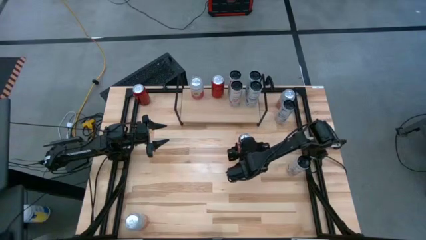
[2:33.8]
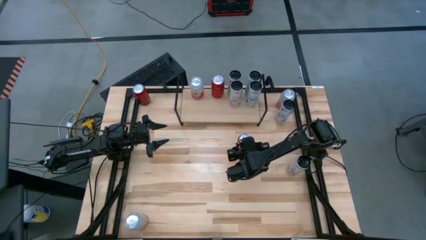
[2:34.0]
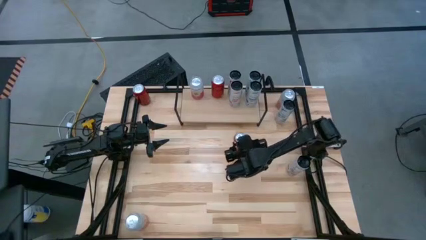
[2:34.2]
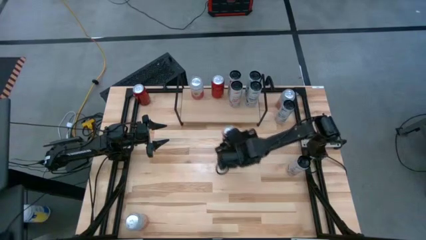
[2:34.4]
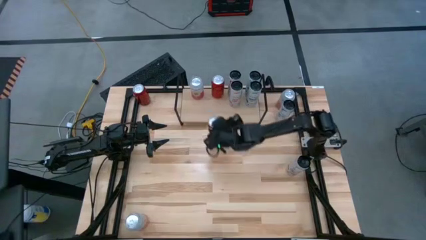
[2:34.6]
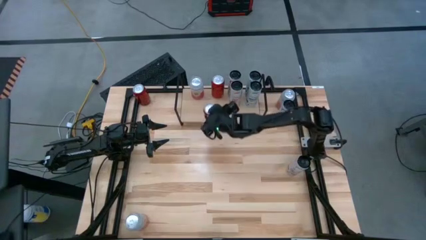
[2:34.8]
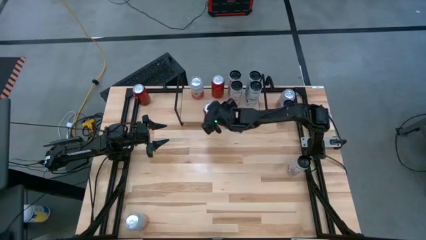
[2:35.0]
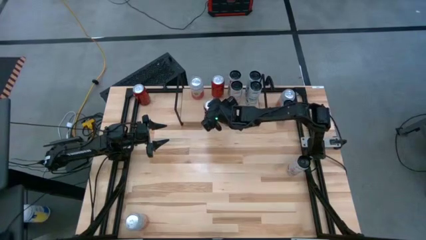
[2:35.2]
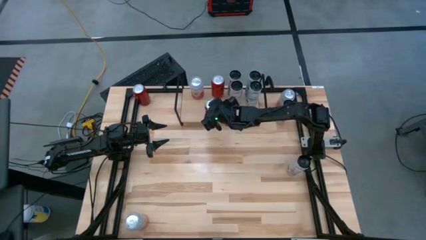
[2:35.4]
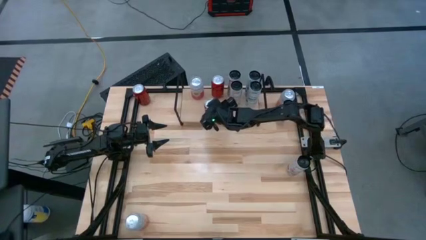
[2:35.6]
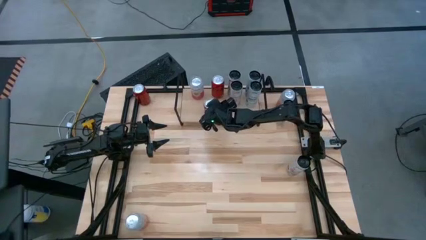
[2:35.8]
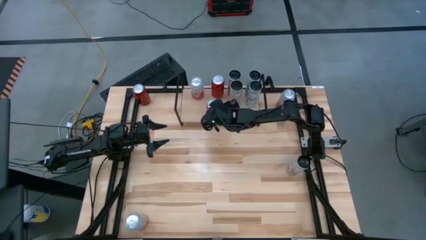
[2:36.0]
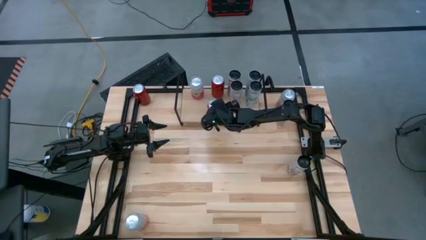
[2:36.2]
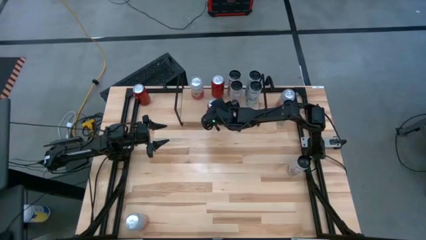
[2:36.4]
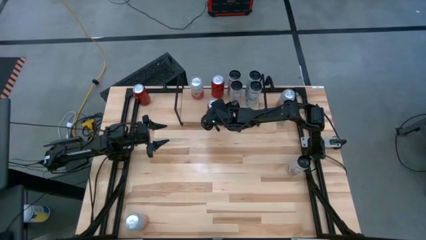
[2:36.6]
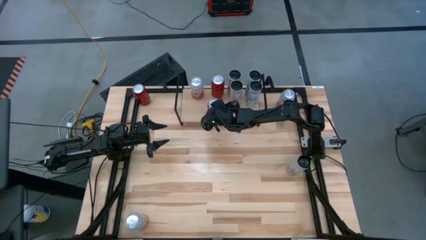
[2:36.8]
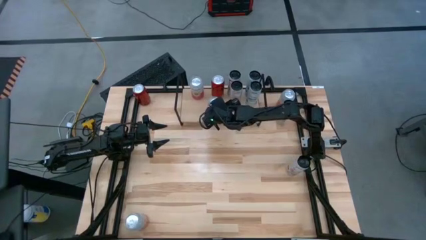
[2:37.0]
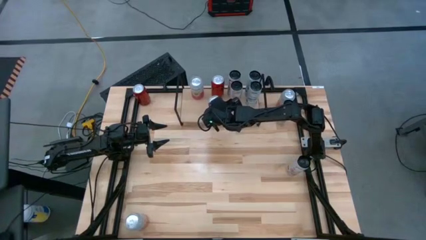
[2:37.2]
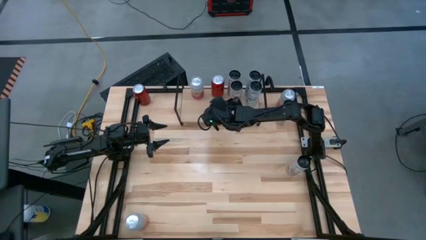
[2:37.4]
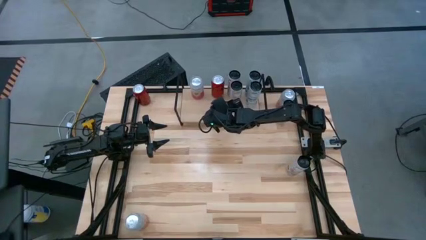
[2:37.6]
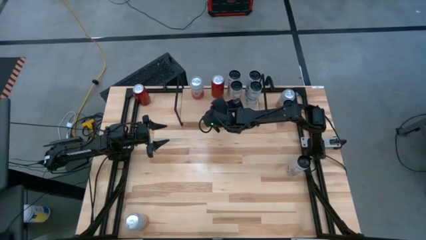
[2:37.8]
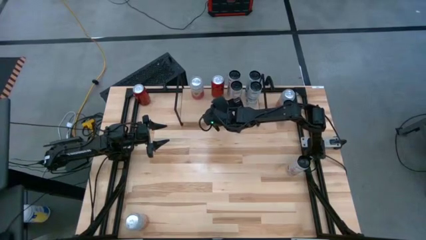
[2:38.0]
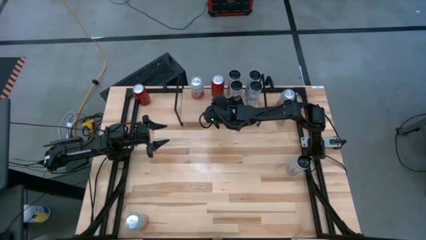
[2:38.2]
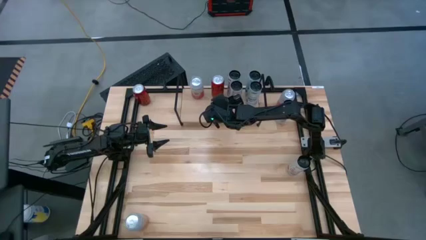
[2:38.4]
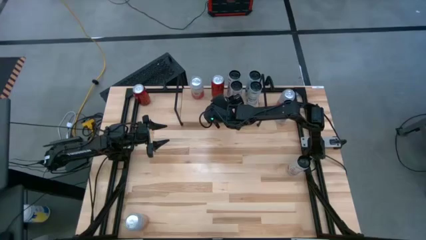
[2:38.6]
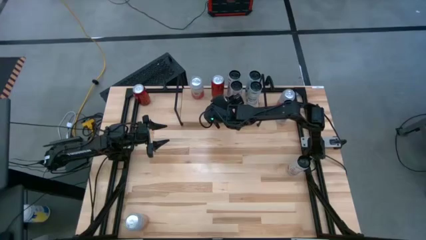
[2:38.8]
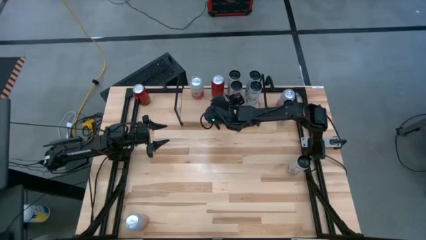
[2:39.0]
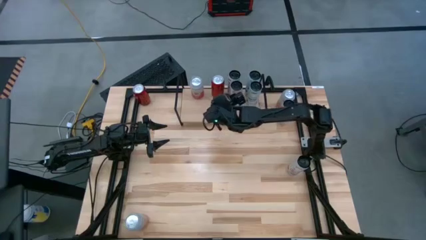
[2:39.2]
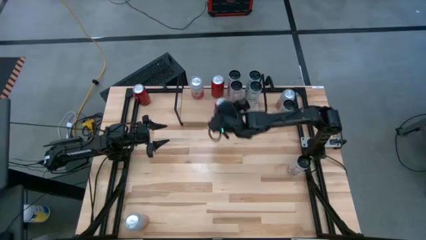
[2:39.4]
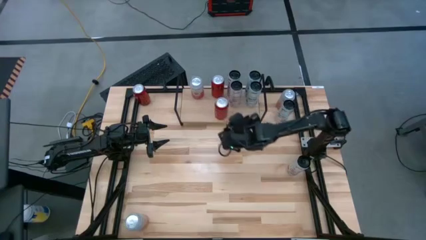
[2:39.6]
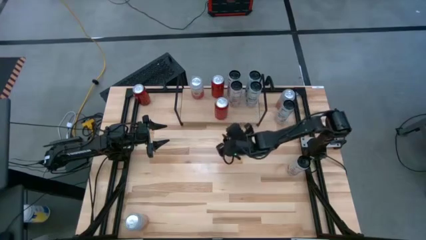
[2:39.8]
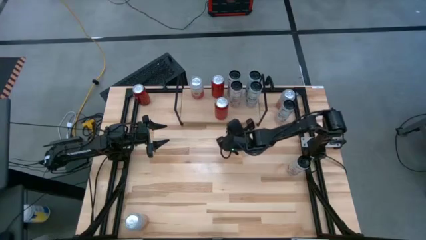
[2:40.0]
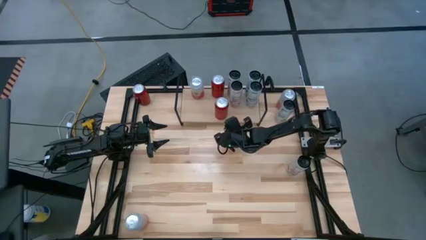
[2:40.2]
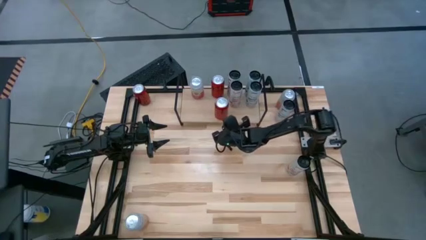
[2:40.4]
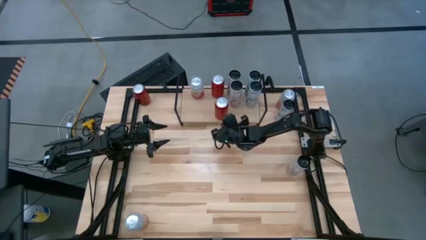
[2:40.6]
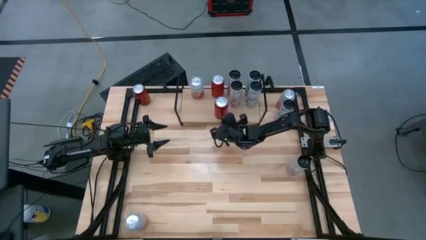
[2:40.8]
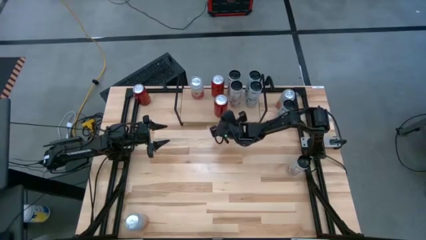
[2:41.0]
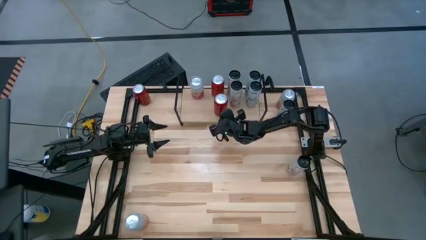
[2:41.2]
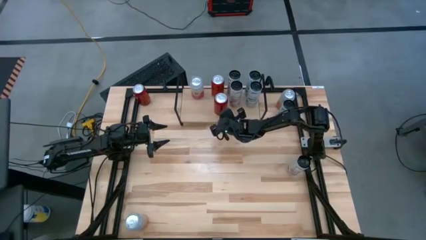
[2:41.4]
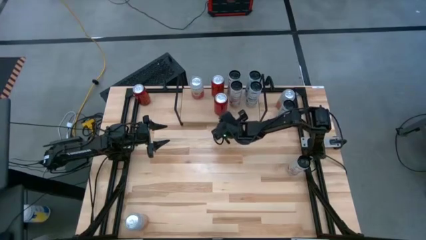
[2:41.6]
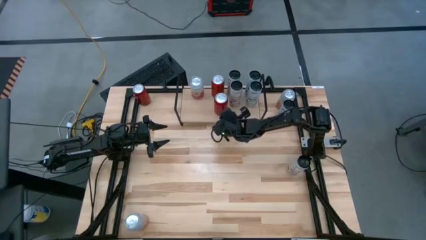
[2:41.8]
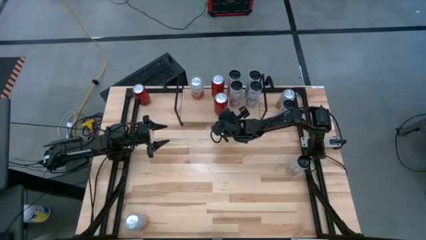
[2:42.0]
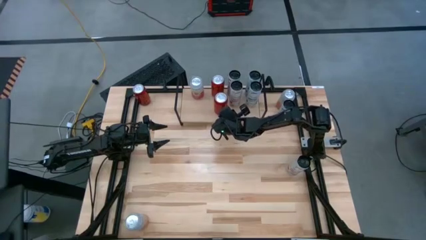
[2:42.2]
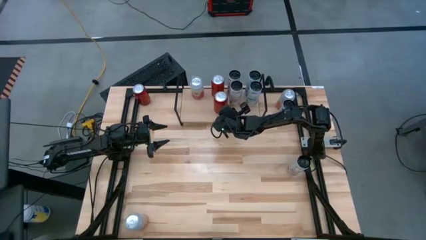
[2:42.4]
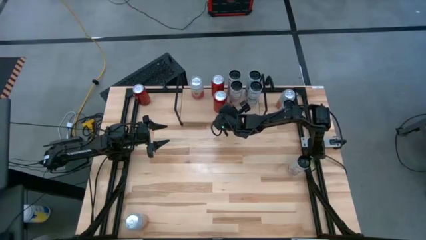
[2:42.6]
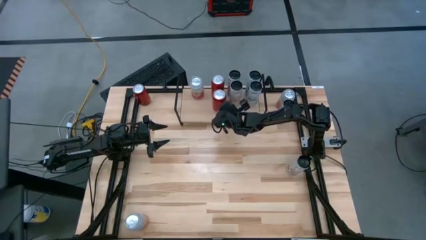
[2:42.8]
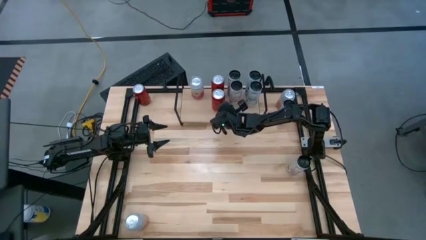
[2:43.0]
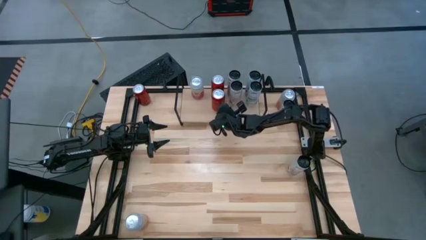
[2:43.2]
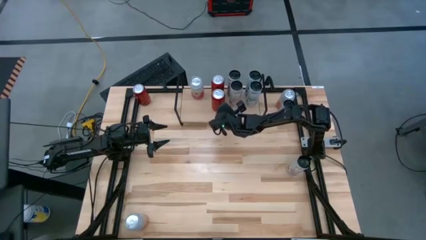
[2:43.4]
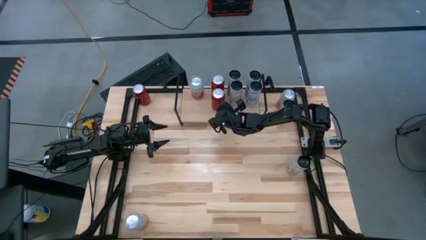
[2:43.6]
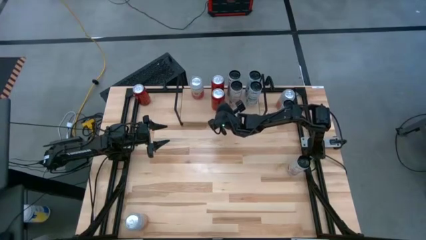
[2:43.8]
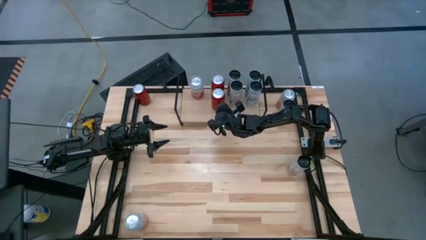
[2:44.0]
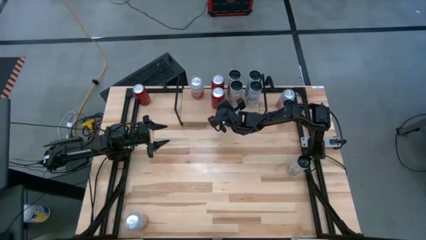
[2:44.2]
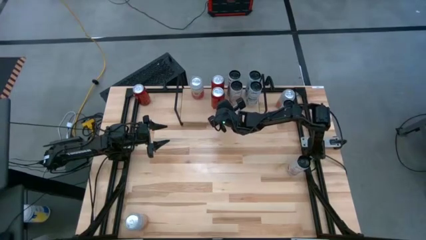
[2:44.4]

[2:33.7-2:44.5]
Task: Place canned beverage on shelf
Put the bottom red black soda can on the shelf aligned with the other red black soda can

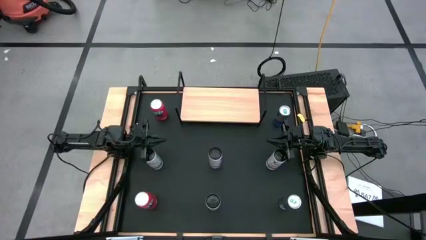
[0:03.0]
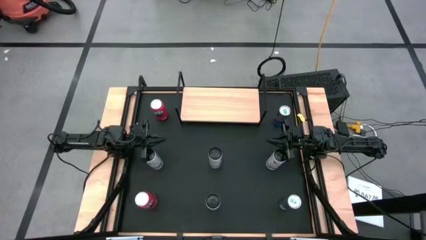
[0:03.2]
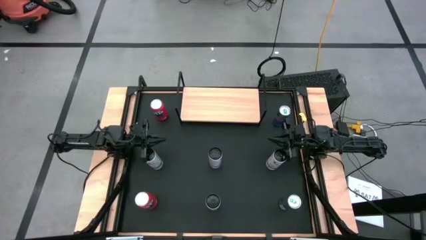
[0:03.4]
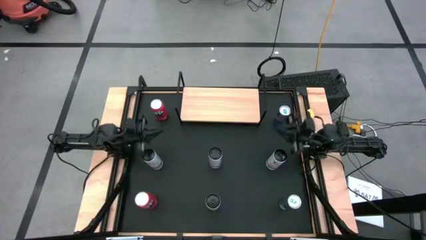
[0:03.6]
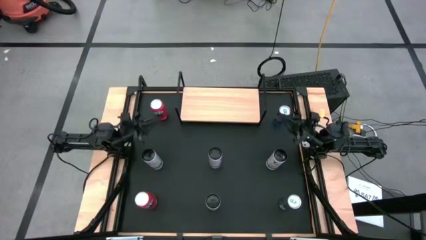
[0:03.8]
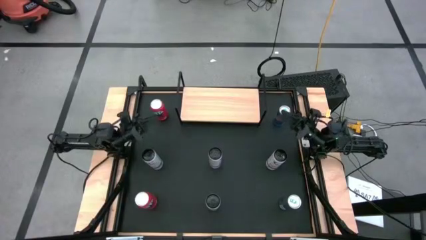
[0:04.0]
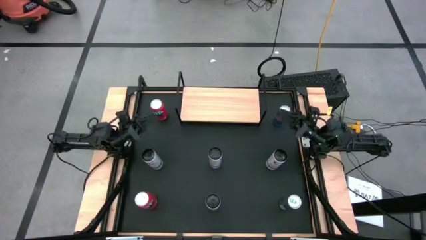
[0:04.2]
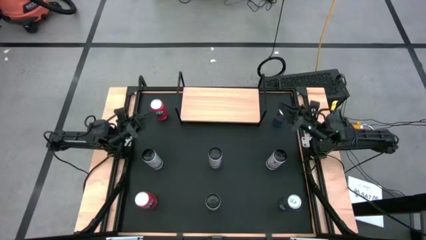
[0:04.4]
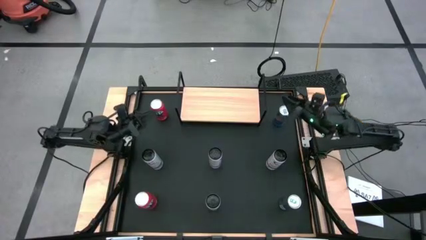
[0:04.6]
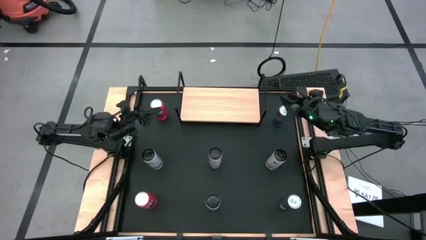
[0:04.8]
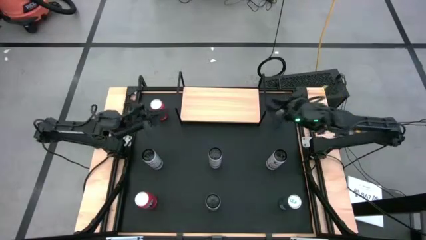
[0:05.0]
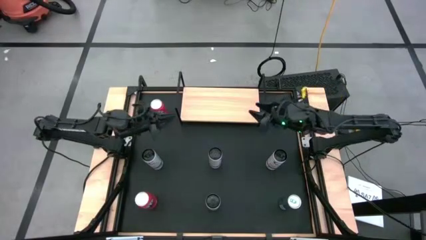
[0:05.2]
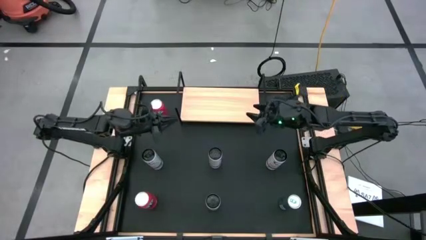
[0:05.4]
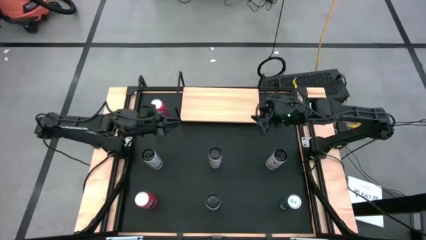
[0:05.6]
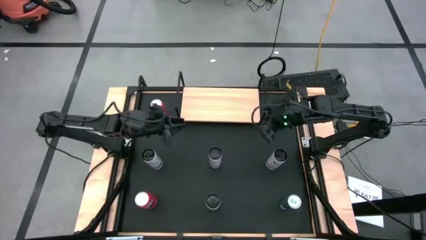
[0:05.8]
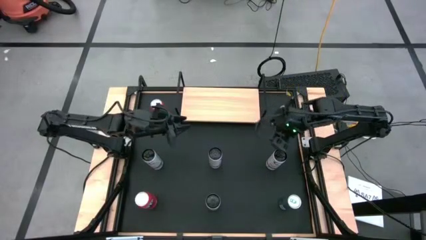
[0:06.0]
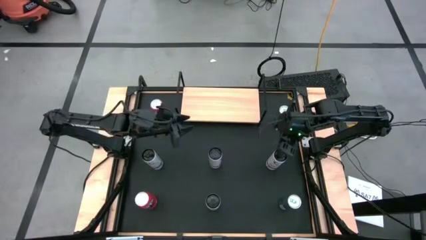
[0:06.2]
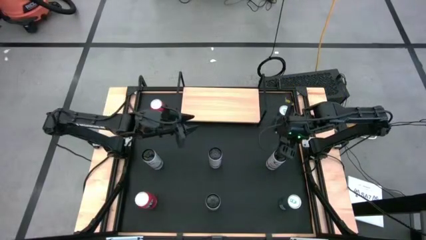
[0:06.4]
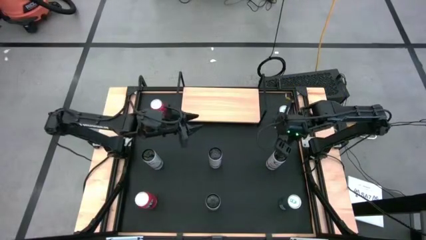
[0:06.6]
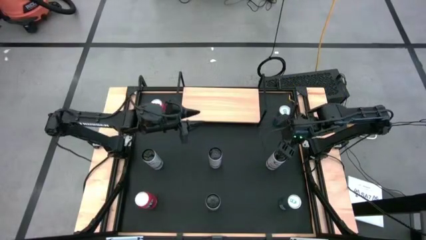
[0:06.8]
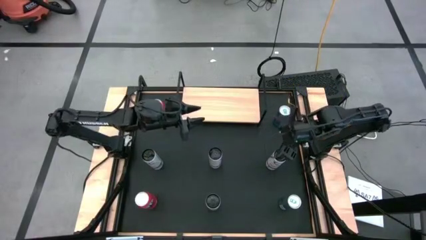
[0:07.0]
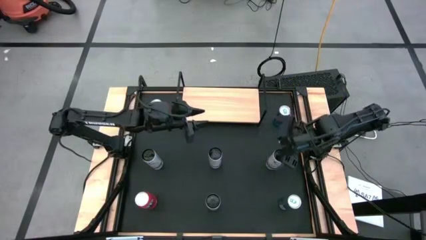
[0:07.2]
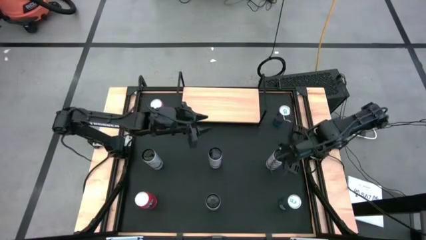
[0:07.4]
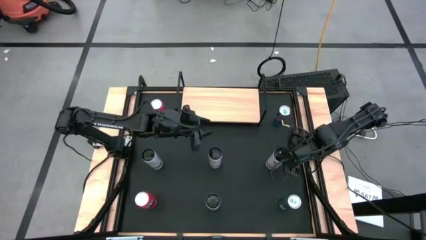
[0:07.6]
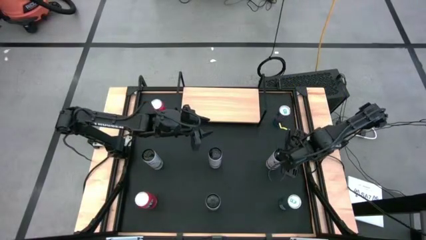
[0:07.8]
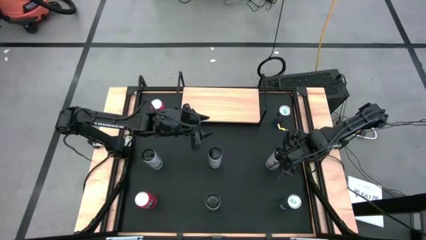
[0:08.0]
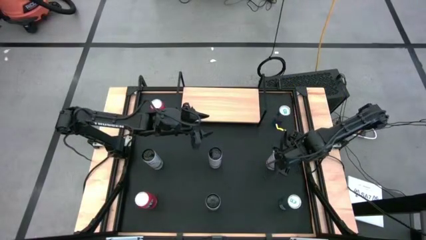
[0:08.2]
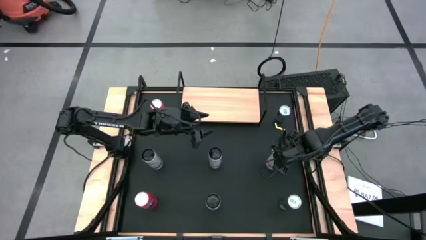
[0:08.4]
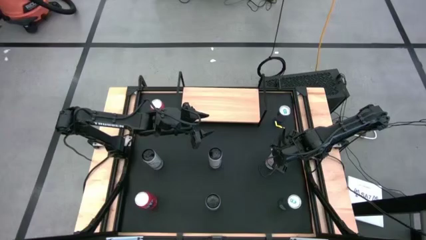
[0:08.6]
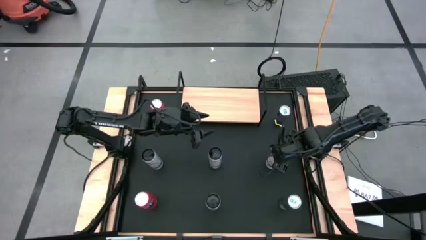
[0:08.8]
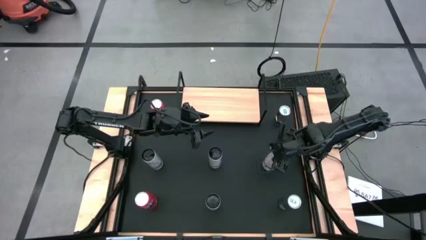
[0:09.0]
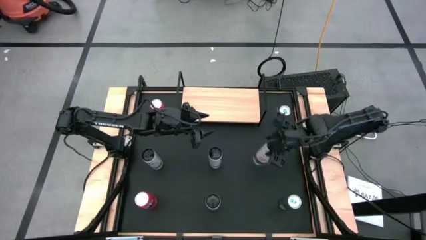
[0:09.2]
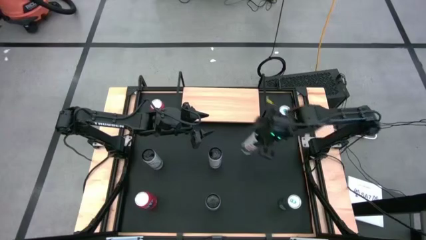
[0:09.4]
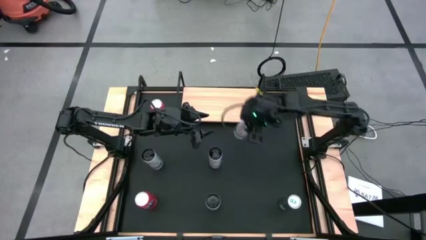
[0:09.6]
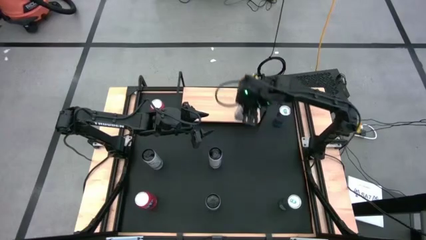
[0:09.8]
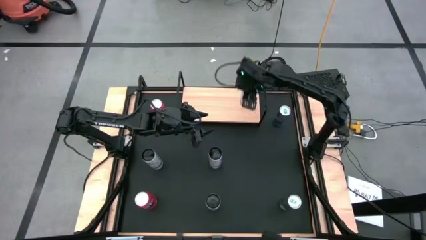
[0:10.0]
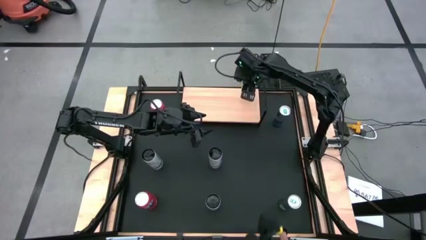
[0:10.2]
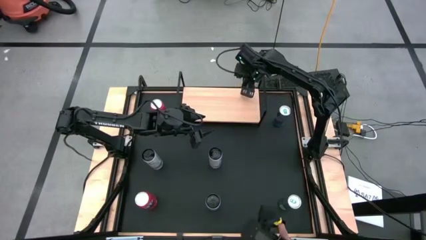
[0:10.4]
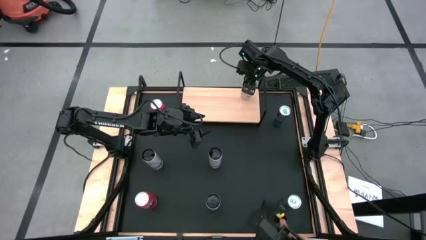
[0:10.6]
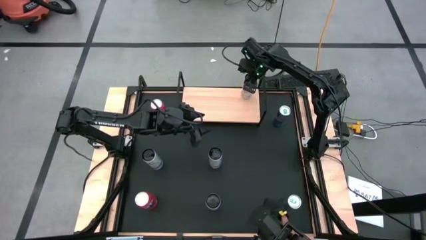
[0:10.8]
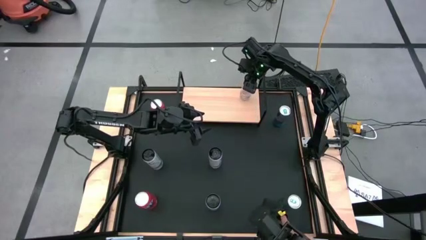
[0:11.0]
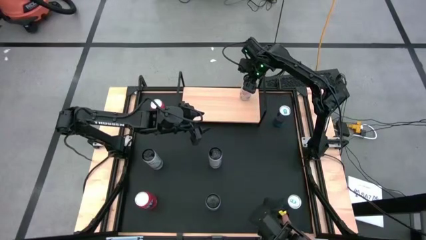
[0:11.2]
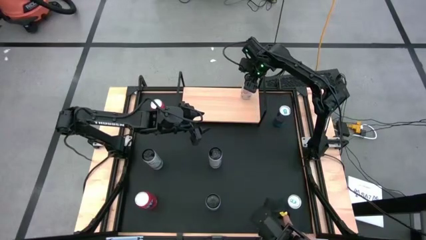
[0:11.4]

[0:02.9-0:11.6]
Task: Place canned beverage on shelf
Put the middle right white soda can on the shelf
